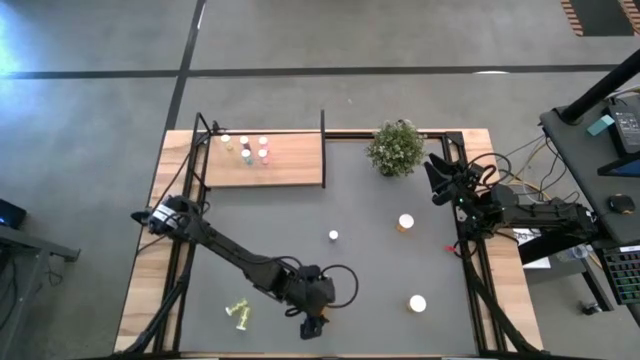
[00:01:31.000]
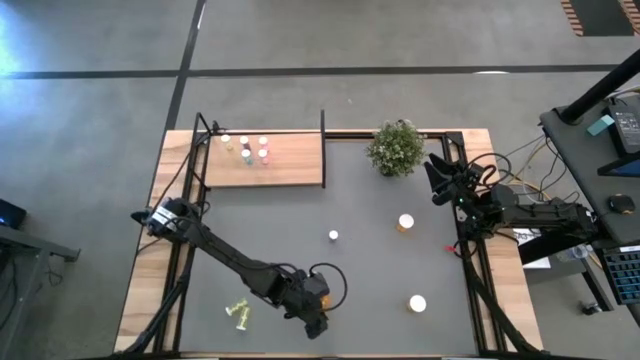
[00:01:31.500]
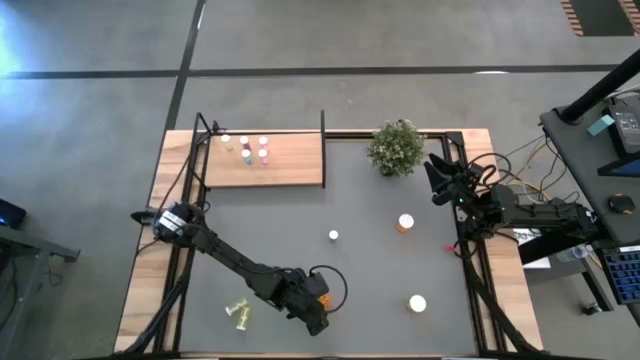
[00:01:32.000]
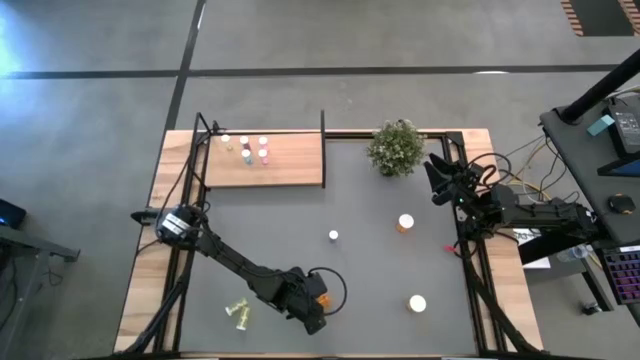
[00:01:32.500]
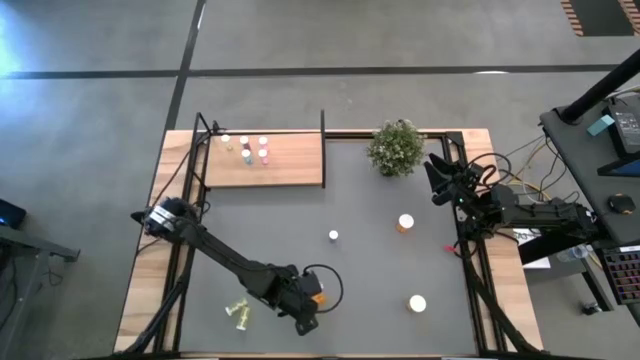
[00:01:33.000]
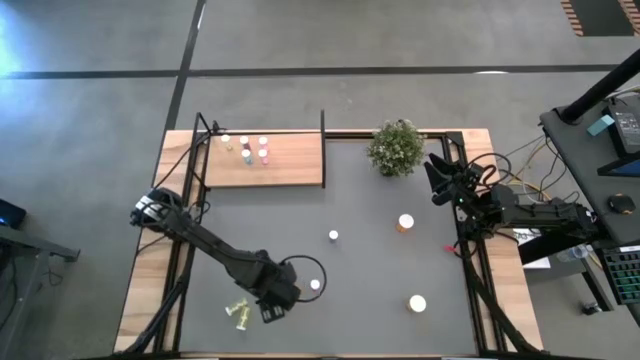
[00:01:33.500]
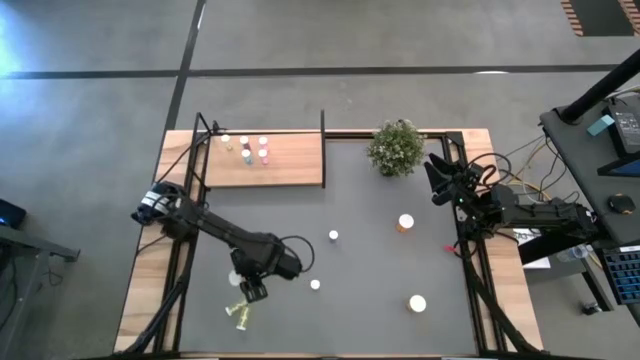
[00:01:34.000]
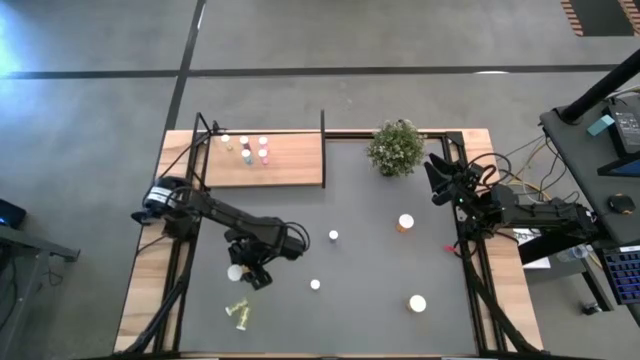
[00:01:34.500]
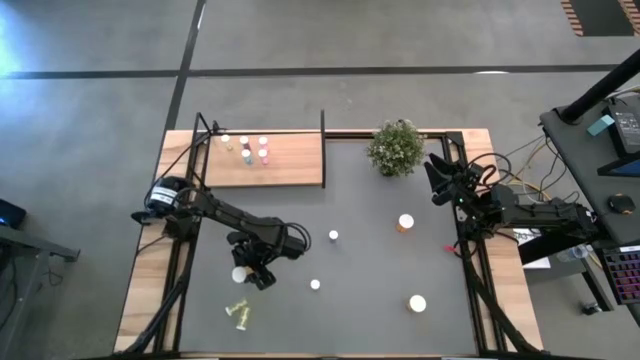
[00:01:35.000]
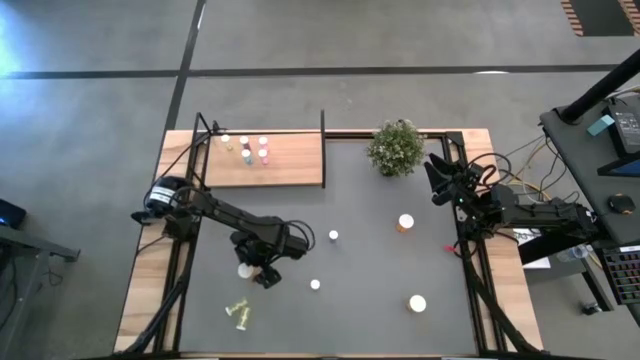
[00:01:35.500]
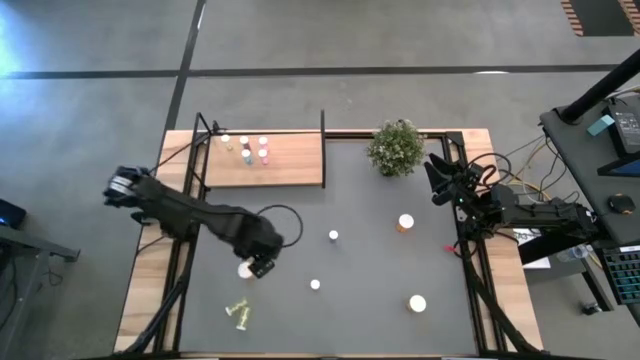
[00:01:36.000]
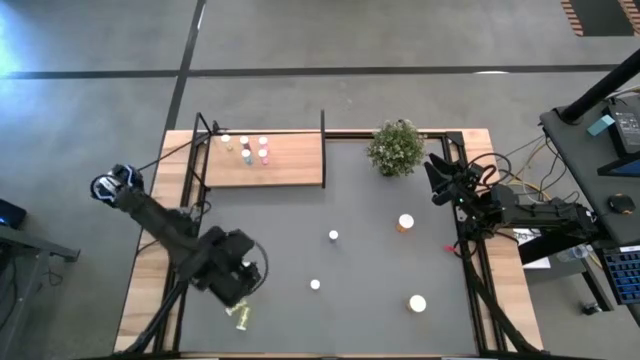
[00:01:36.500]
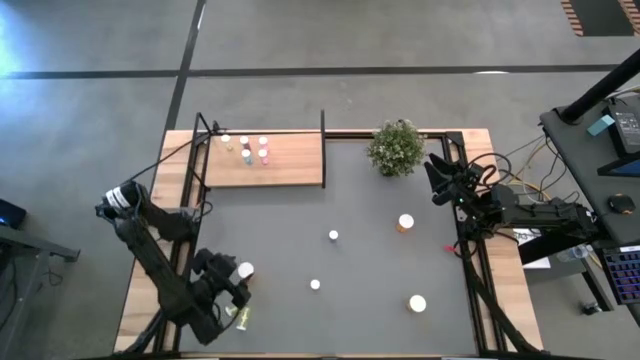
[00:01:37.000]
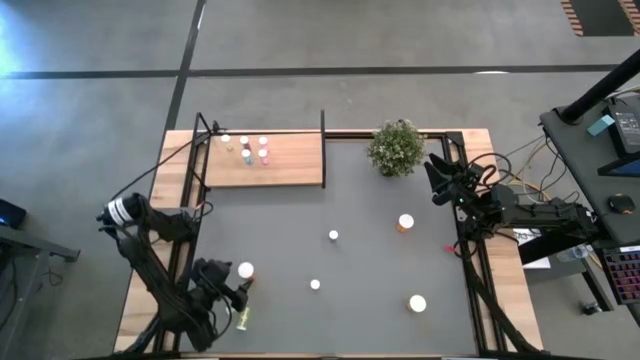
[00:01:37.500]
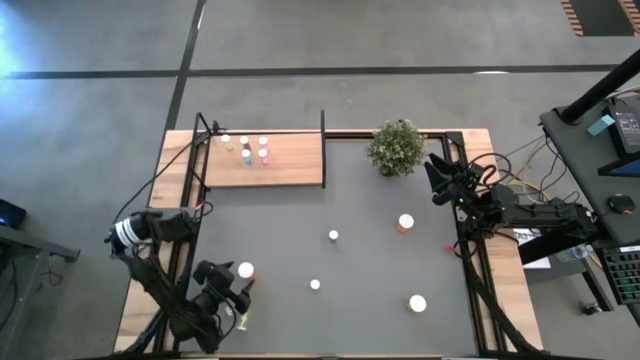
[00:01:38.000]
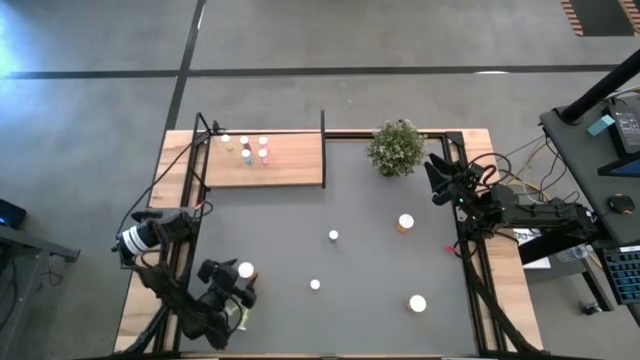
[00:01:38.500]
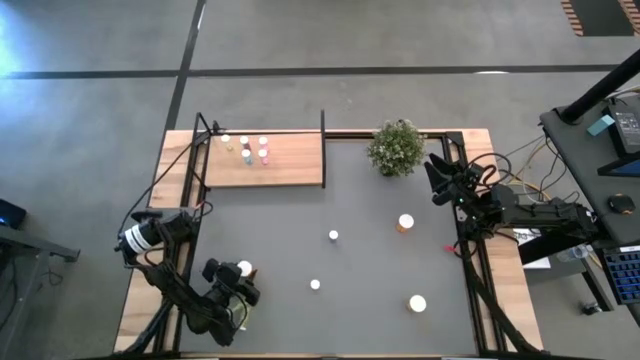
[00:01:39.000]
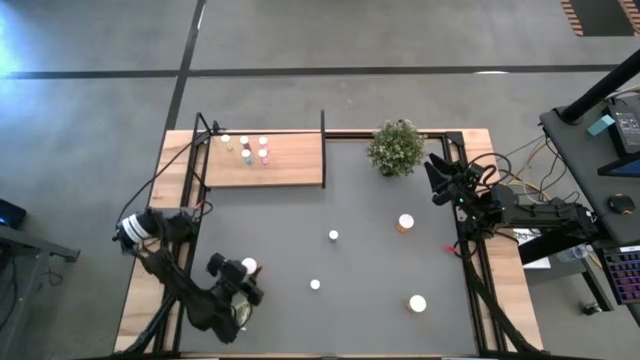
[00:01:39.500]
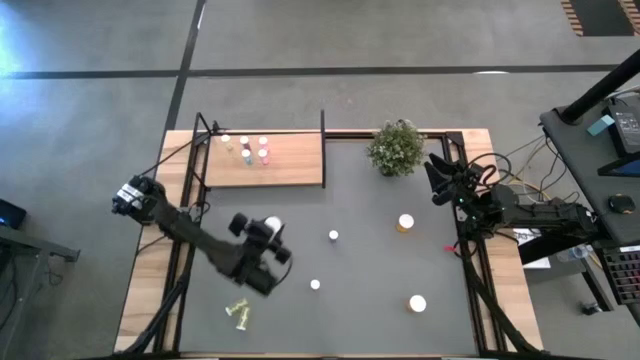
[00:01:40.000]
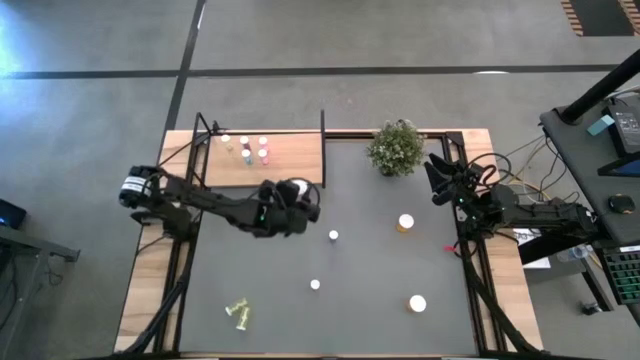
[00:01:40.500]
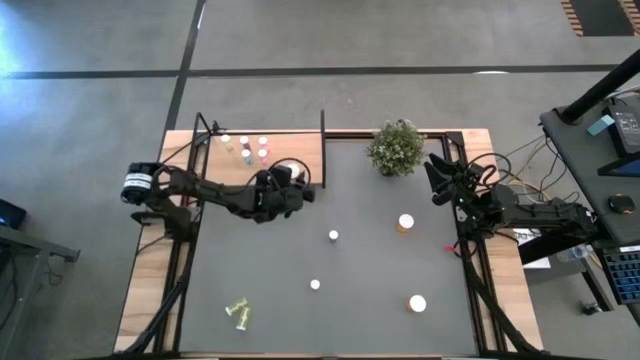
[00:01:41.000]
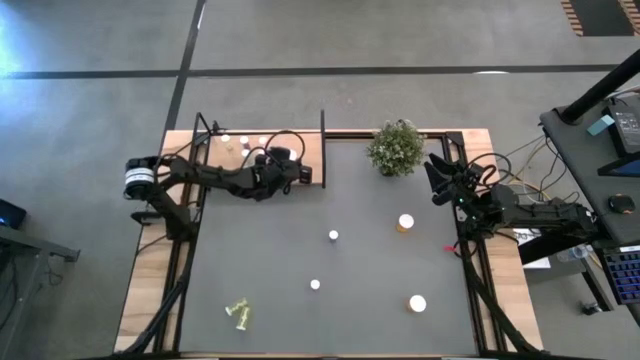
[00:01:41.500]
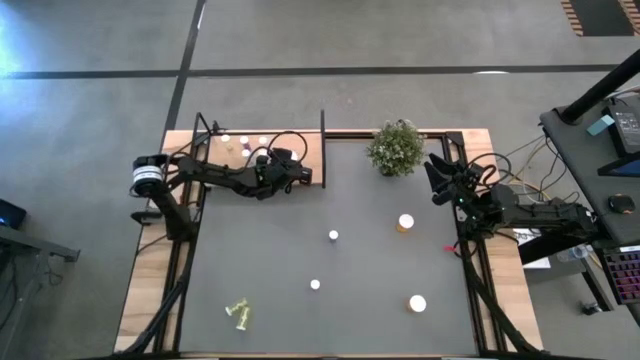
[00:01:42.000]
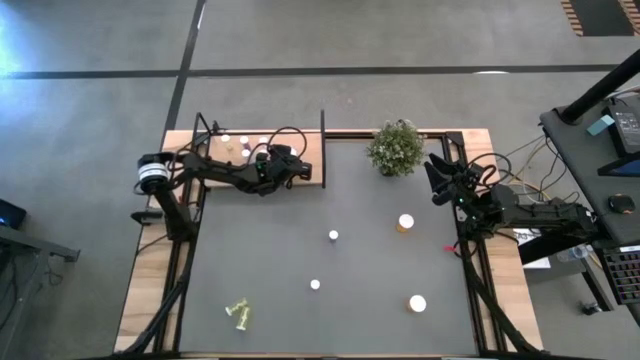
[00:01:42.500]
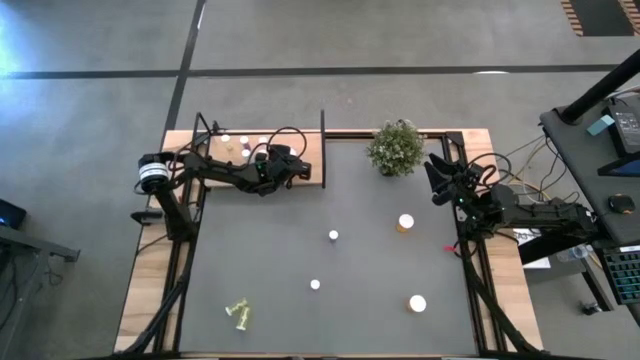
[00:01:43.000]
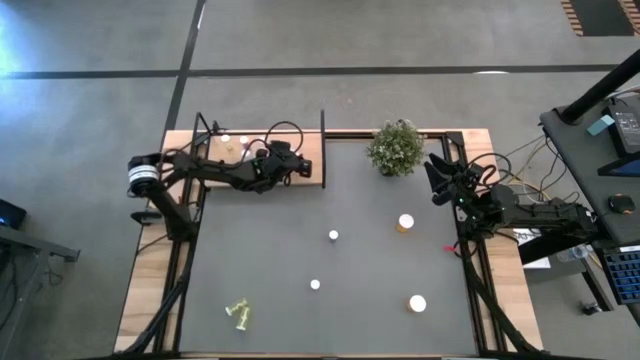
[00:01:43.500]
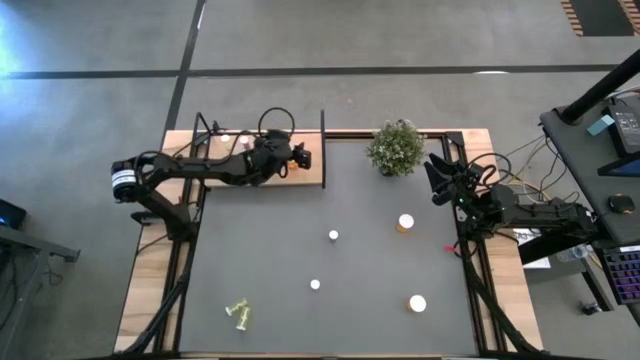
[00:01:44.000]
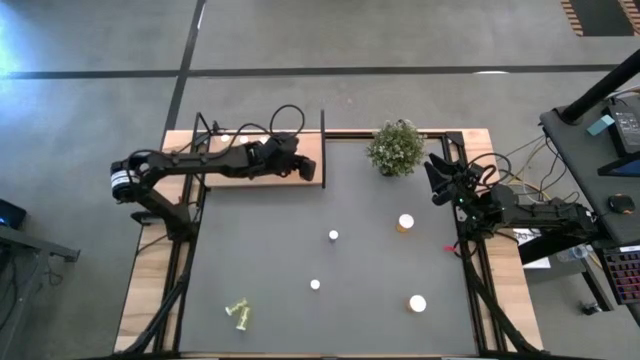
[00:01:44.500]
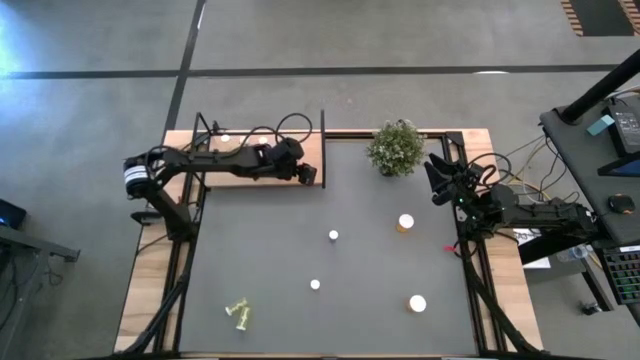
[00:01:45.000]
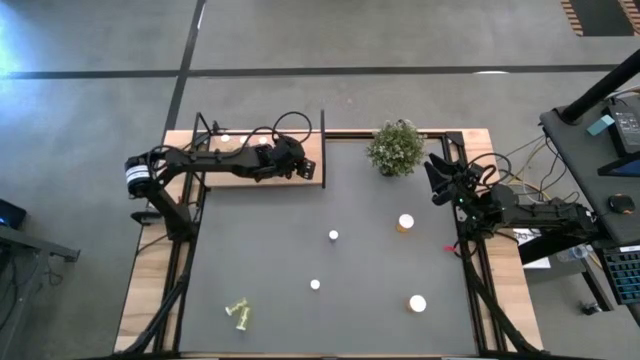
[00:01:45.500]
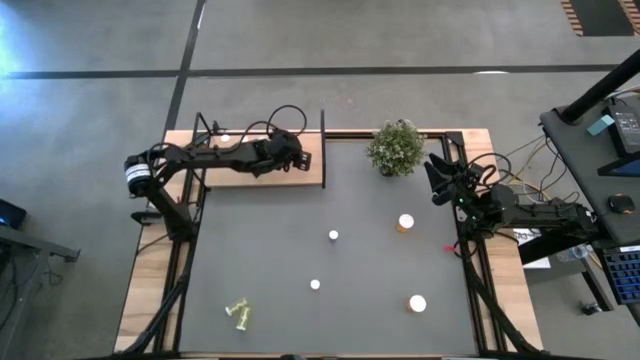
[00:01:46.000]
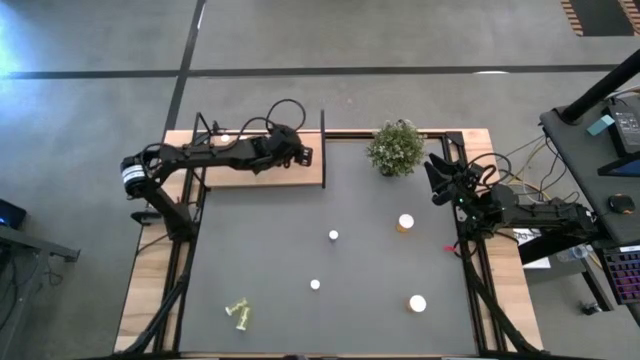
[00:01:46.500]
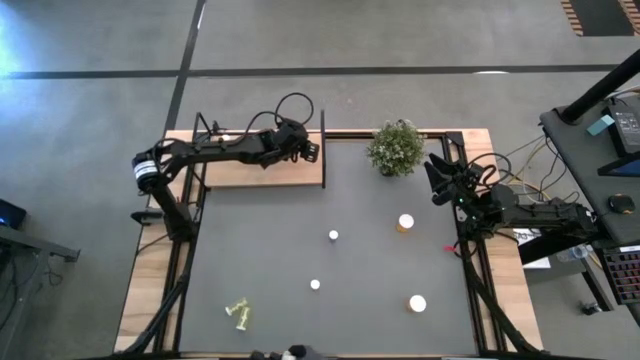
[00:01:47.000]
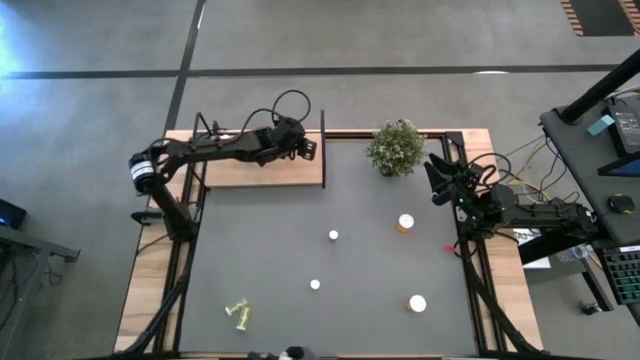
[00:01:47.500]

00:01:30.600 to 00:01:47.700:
Task: Pick and place medicine bottles onto shelf by color
Put the bottom left orange pill bottle on the shelf
